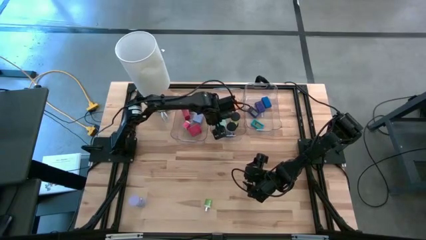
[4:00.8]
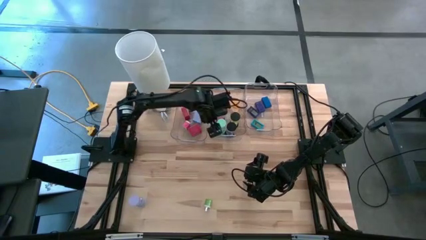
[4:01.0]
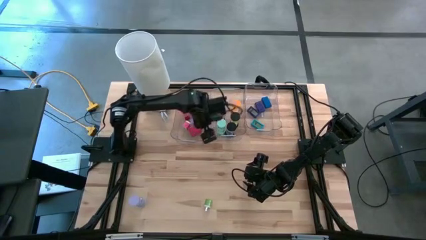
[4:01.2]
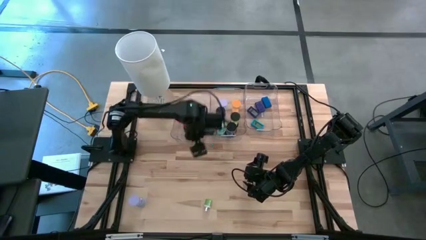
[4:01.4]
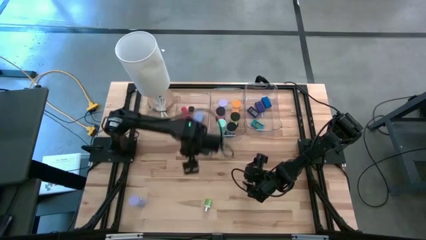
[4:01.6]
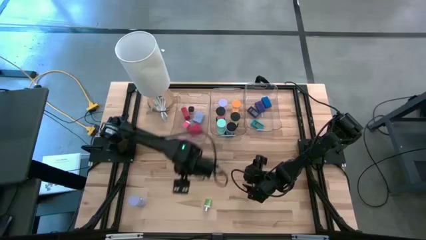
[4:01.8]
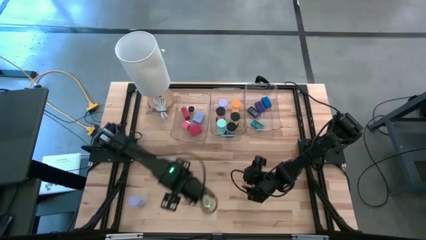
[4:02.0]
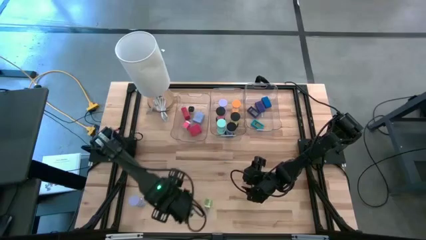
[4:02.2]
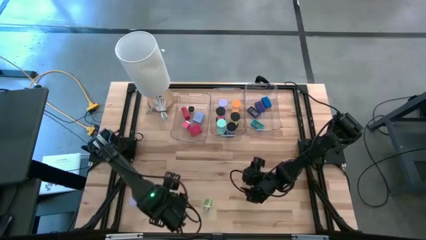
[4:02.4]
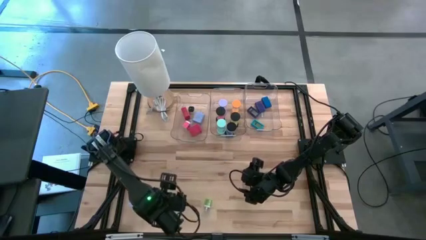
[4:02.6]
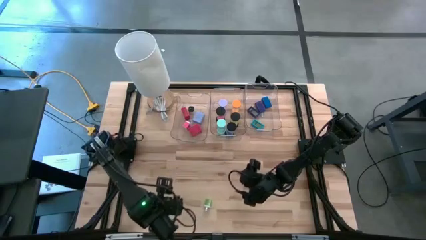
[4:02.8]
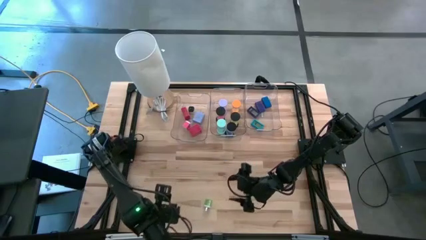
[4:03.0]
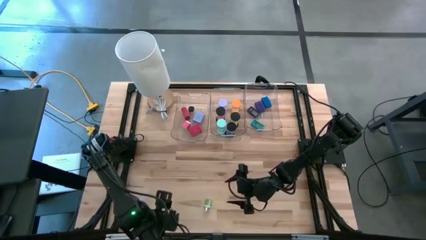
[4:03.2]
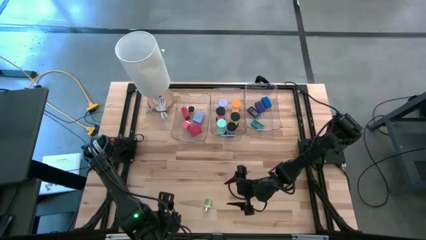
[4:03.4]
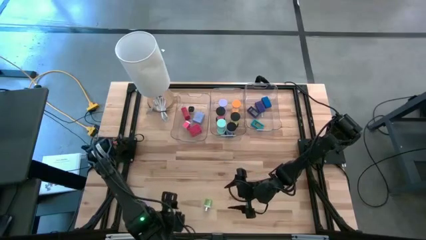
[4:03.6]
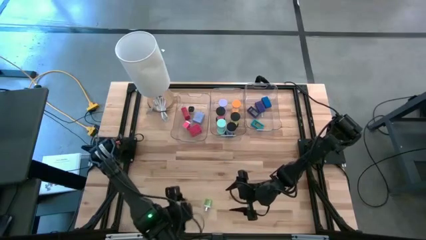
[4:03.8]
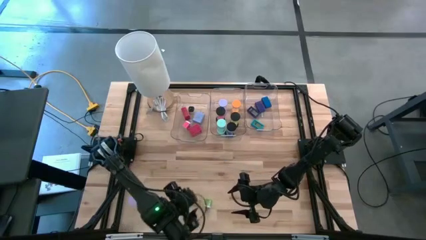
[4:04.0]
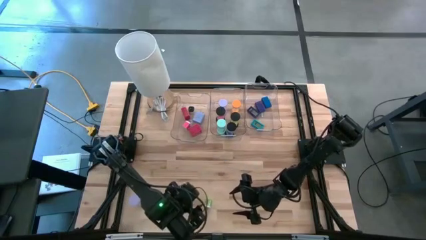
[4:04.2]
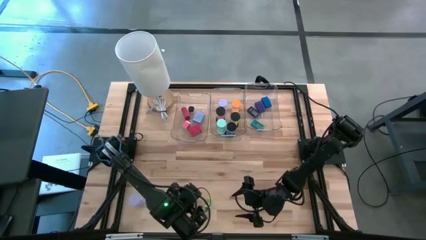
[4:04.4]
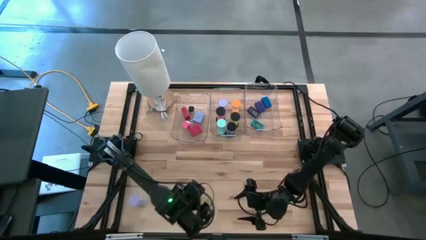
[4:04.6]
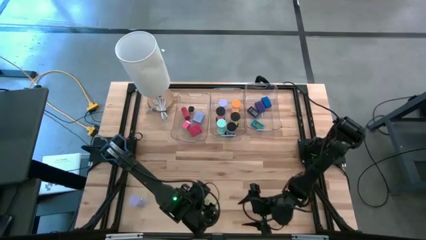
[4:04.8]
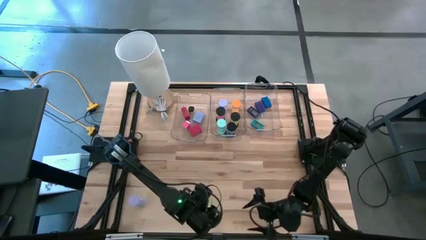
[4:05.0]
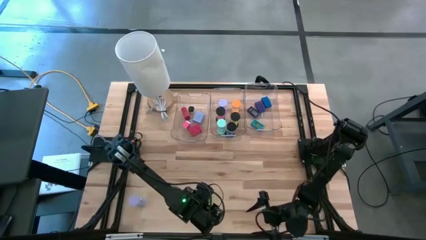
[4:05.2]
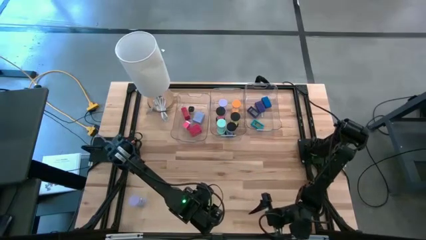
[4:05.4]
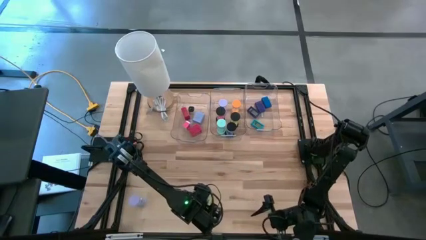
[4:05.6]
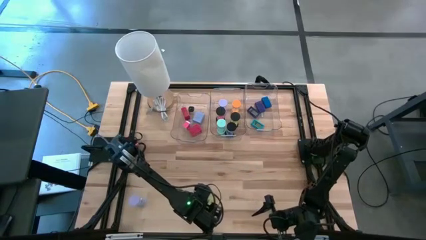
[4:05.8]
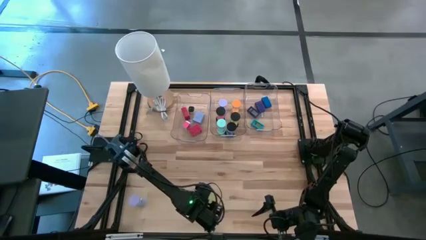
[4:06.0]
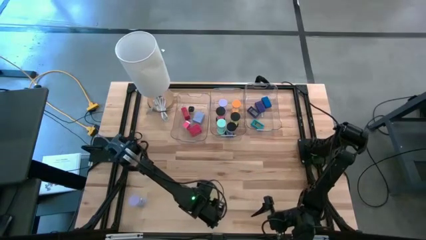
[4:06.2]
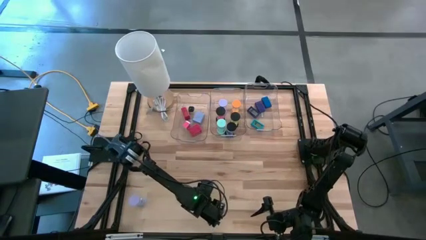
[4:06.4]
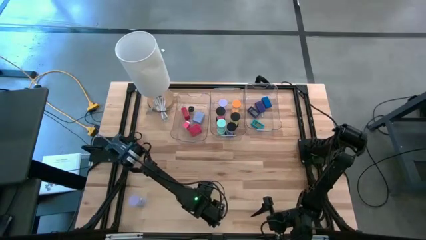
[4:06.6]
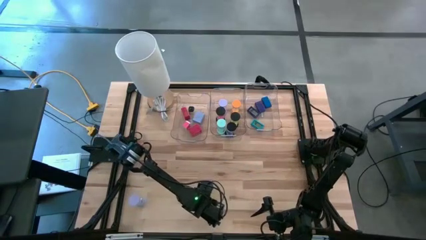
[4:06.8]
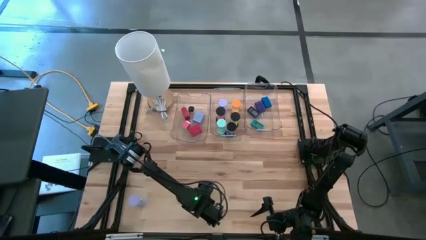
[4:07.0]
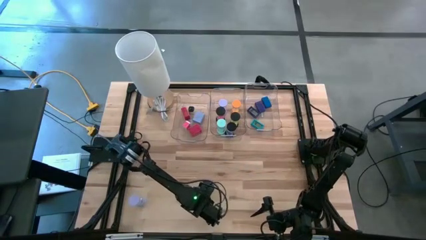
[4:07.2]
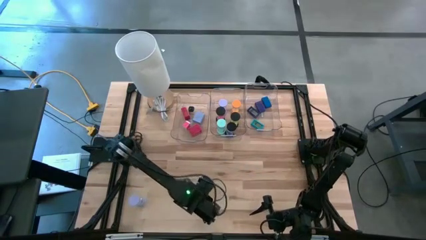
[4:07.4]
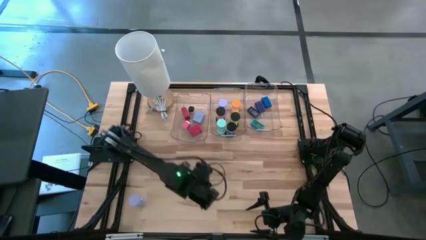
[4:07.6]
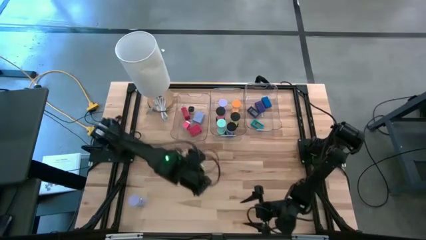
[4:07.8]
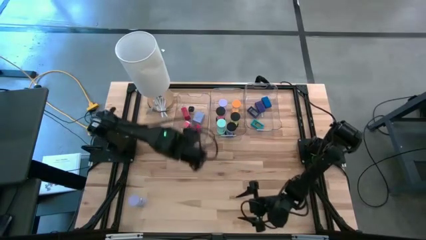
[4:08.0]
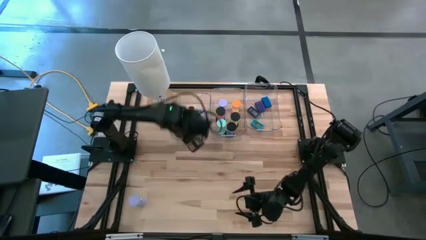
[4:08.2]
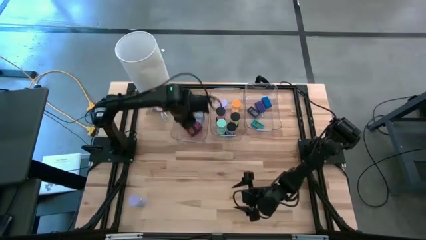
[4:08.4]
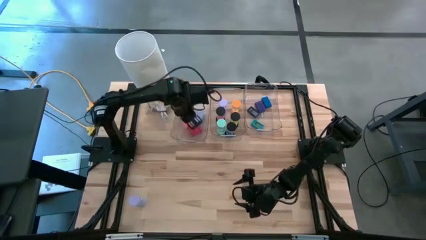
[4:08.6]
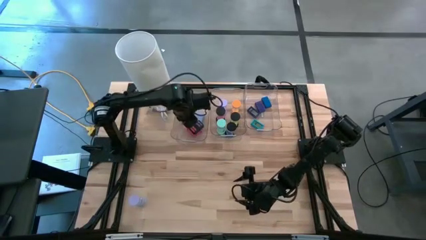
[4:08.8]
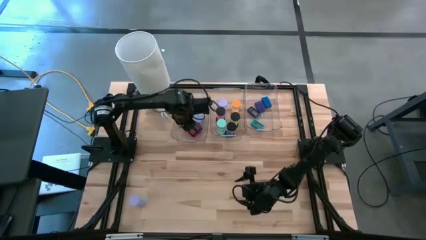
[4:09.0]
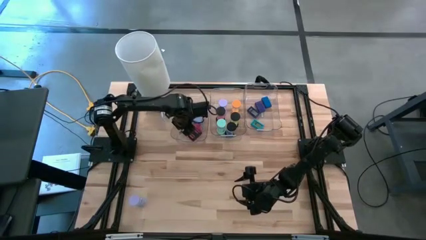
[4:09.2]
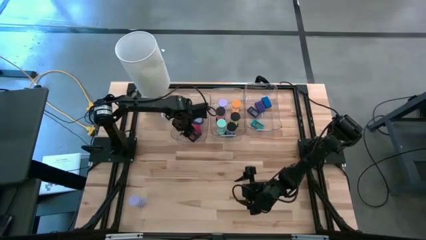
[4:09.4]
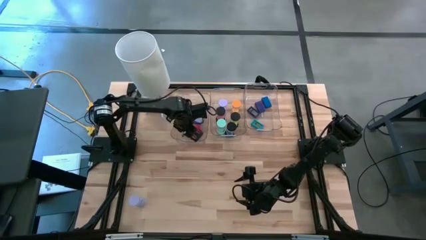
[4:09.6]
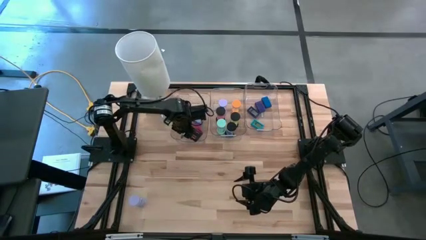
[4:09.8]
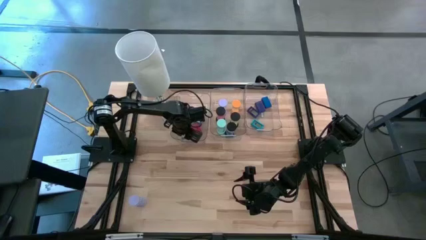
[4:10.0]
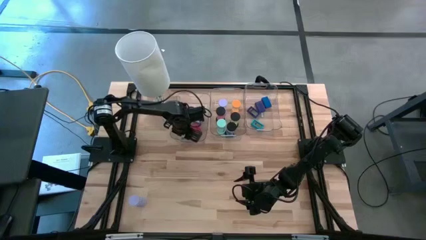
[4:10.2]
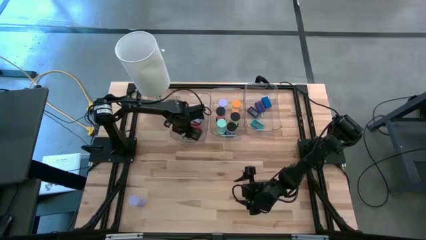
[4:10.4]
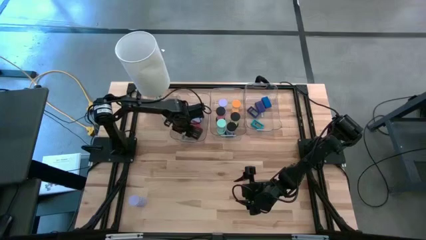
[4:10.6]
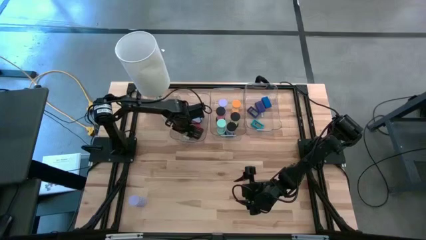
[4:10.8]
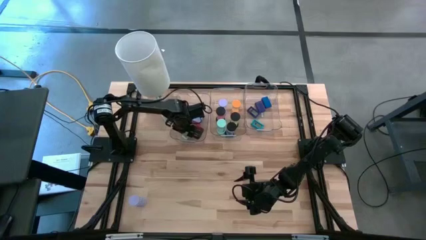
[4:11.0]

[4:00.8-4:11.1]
Task: Pick & Place Office items
Put the green charger adapter into the left transparent bin
